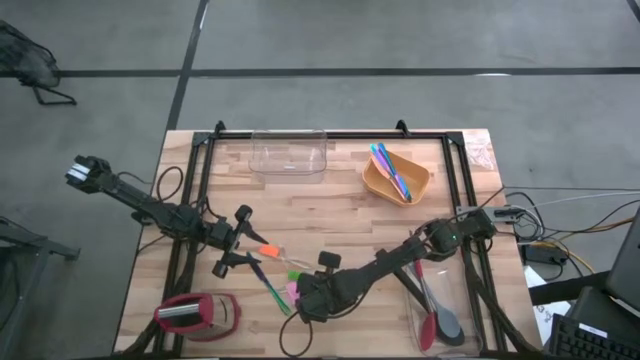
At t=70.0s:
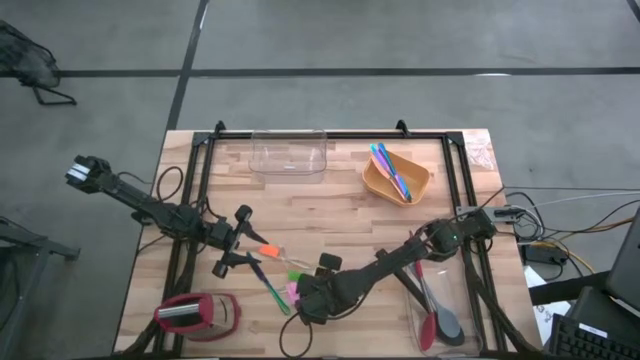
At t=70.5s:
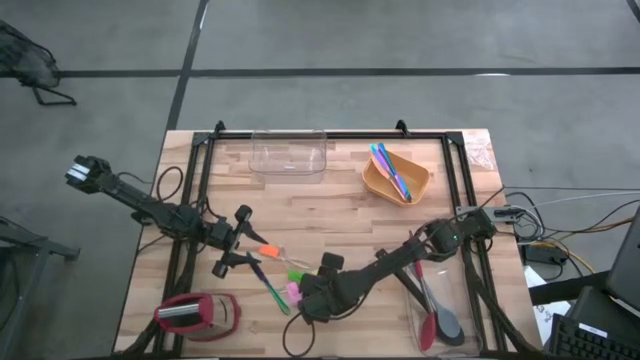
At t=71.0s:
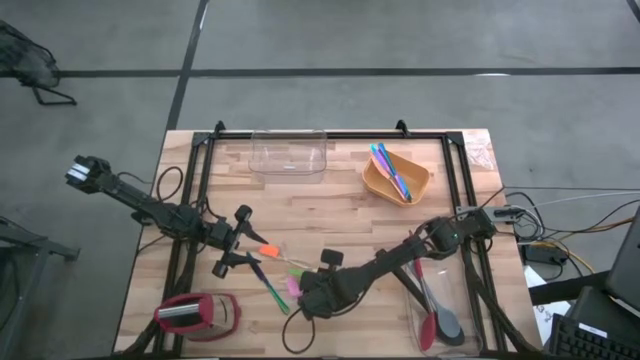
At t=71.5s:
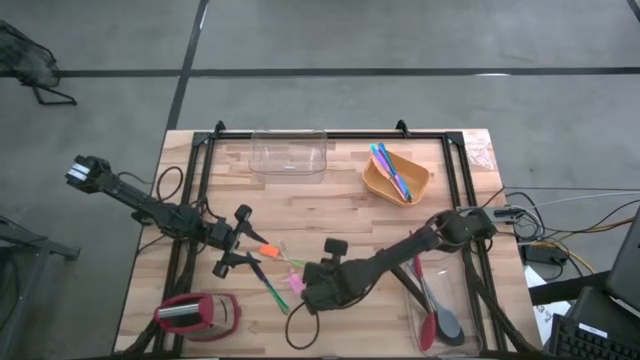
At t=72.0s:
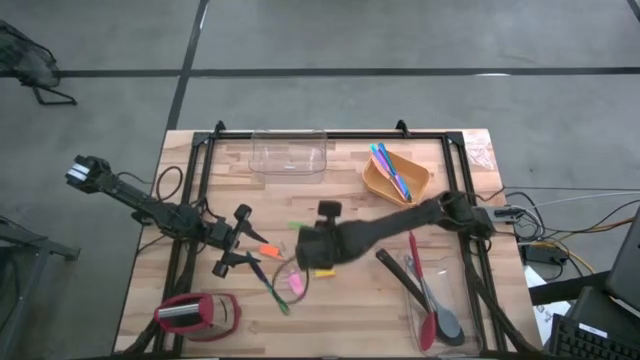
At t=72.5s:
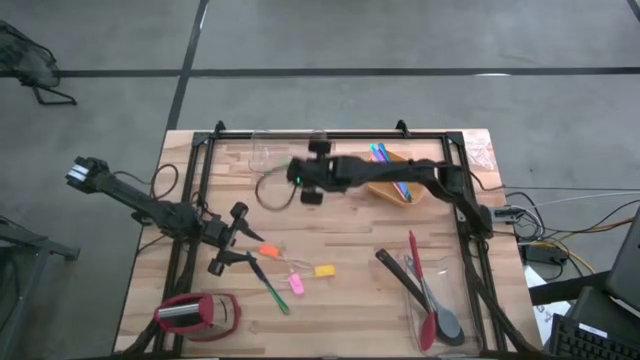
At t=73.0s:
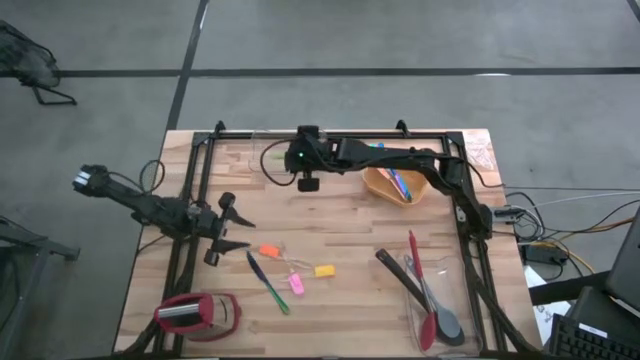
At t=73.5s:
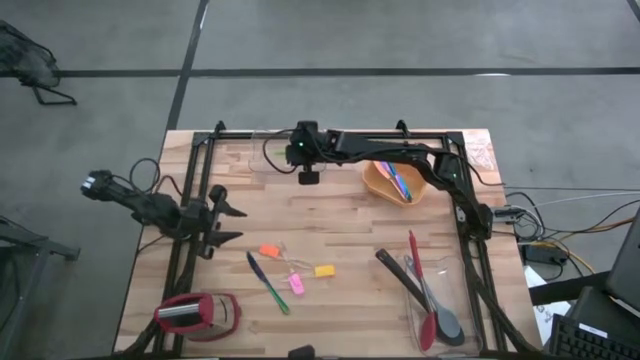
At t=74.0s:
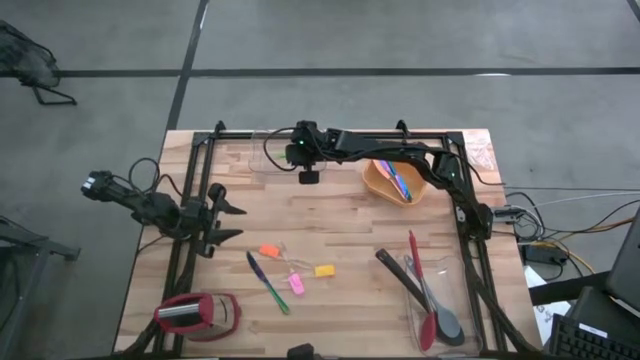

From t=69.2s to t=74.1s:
Task: Pick & Place Kitchen Items
Put the green spatula into the top transparent bin

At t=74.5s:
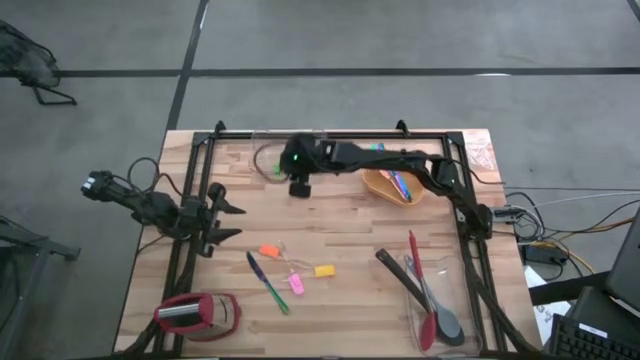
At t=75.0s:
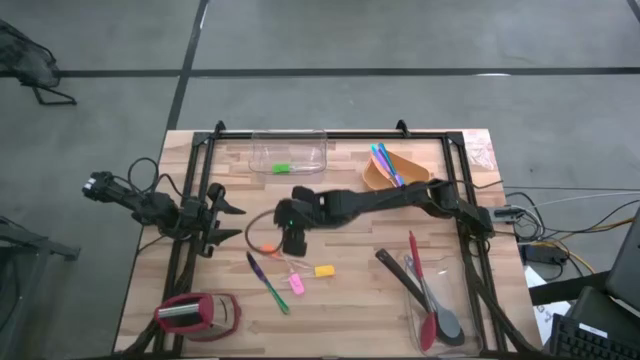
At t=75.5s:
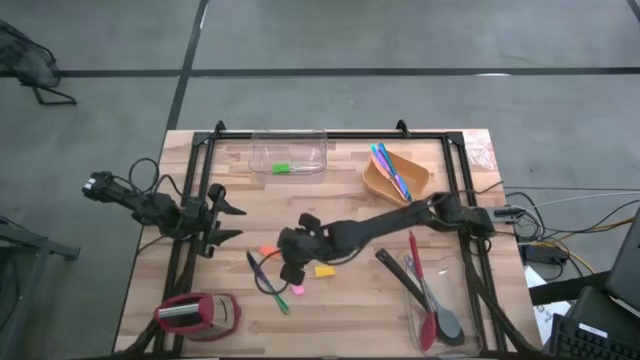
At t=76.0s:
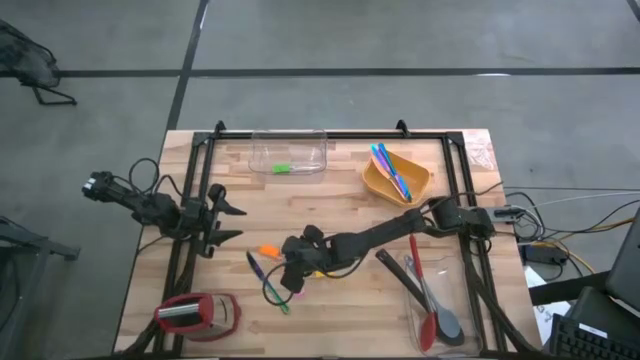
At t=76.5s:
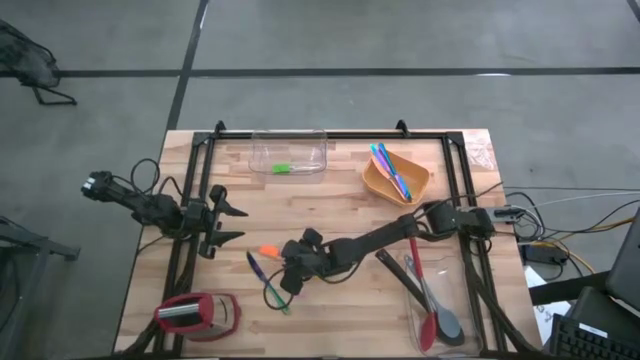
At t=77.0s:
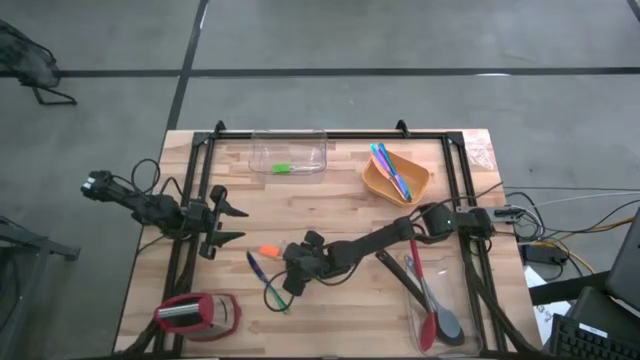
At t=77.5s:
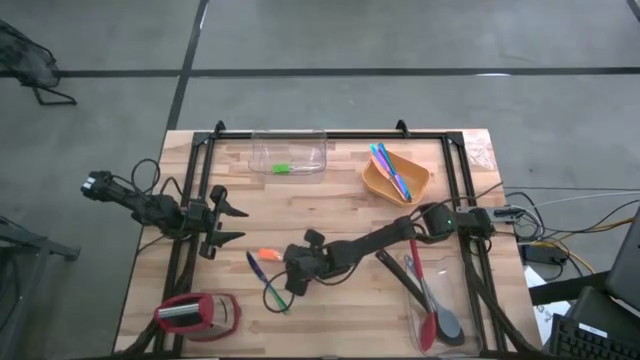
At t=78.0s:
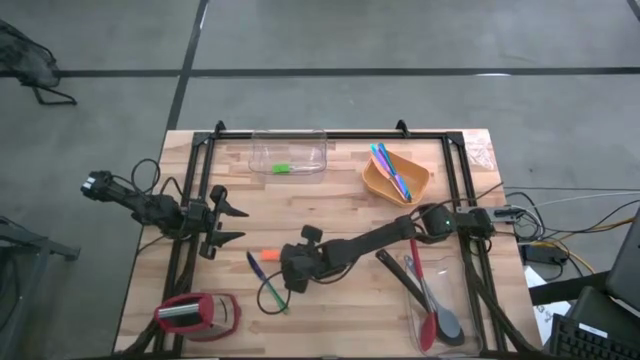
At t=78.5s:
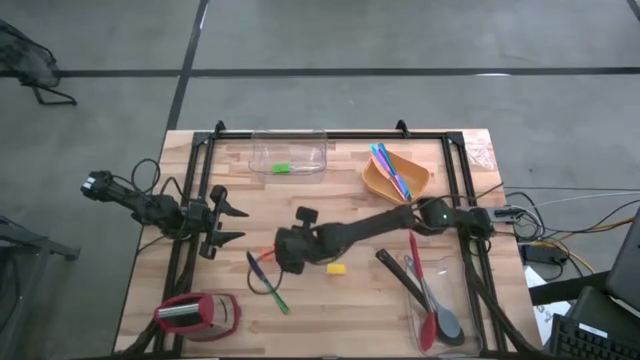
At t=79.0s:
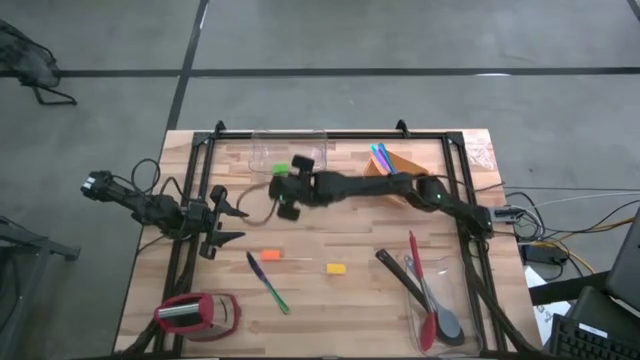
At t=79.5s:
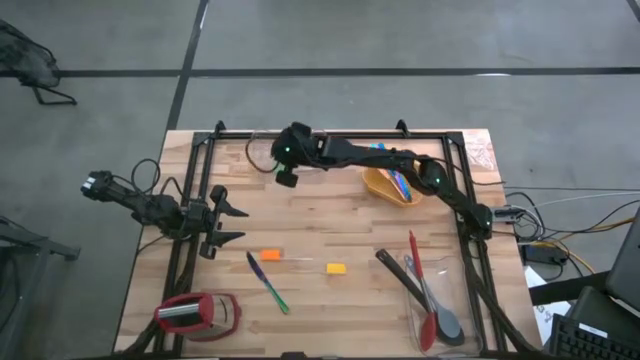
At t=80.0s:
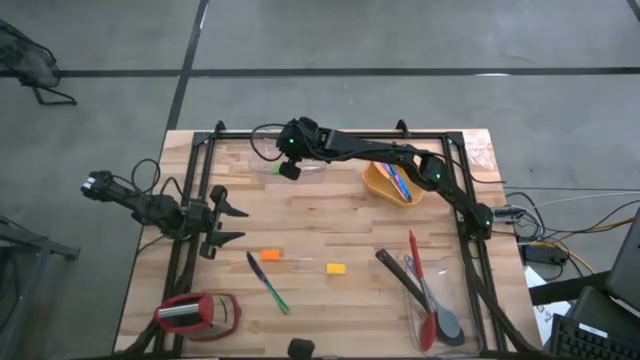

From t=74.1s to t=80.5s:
Put the pink spatula into the top transparent bin

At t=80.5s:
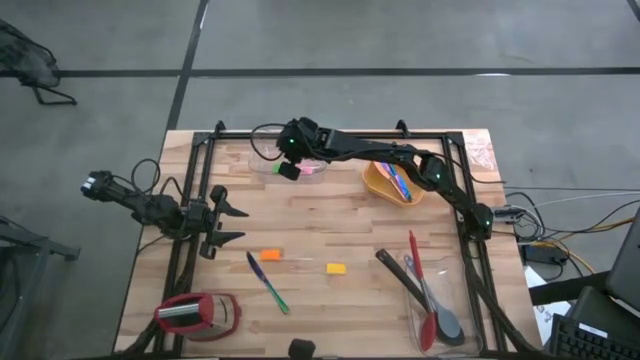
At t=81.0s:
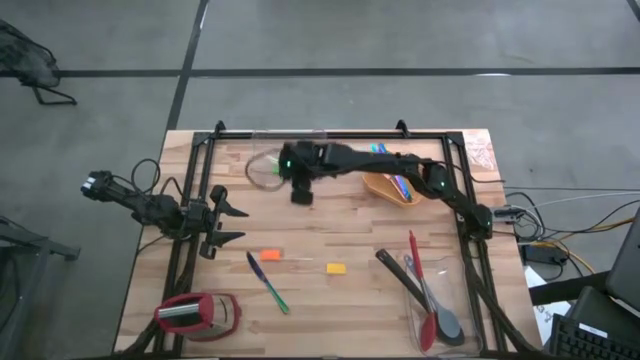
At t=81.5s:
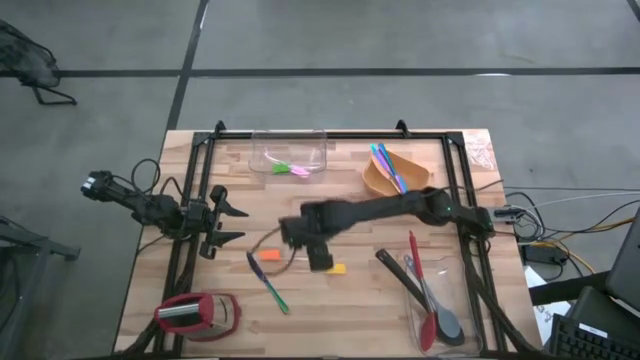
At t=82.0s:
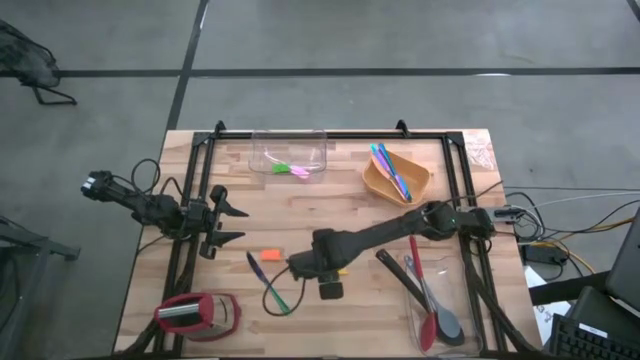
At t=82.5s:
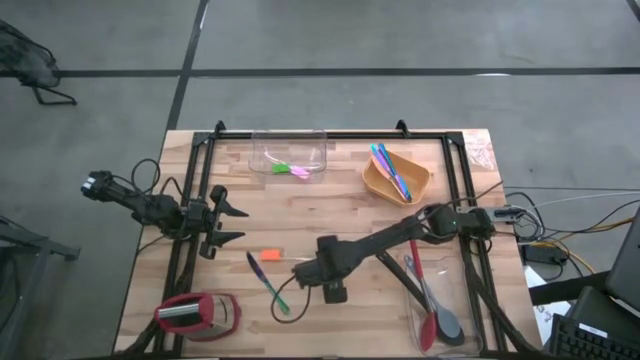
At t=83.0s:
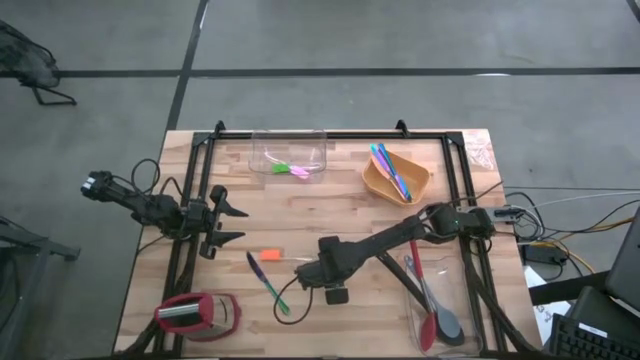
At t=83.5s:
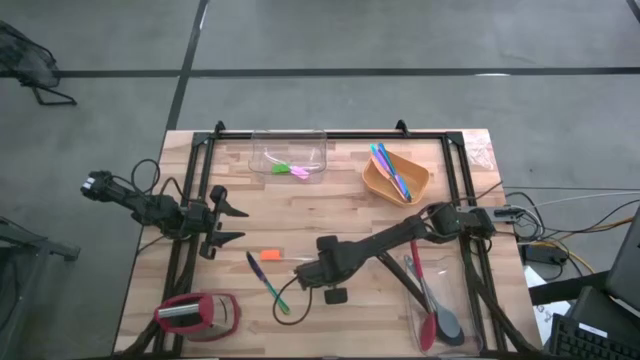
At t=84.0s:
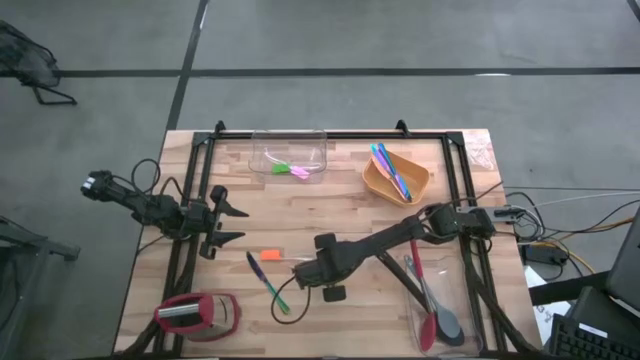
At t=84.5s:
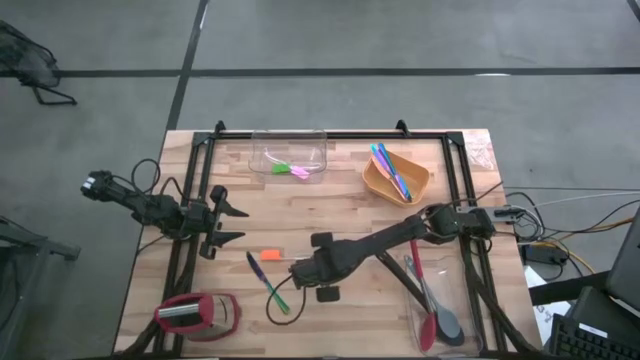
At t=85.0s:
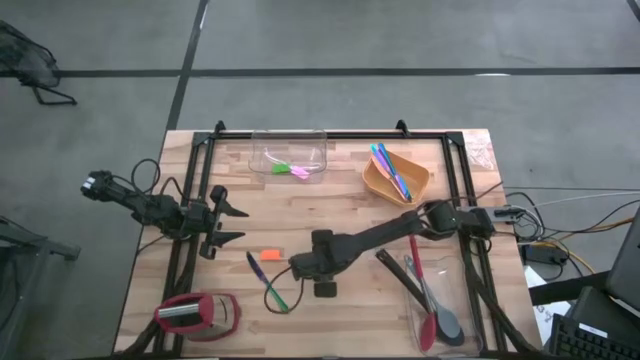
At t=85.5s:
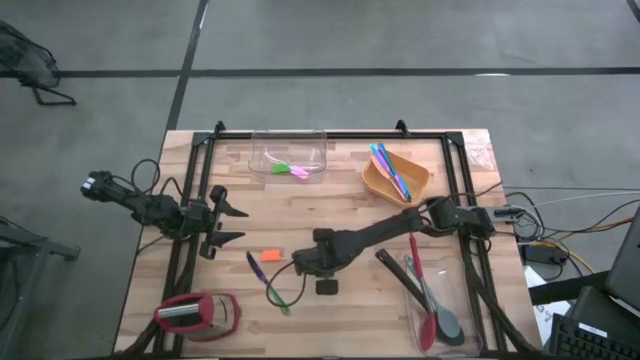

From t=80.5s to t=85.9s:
Put the yellow spatula into the top transparent bin

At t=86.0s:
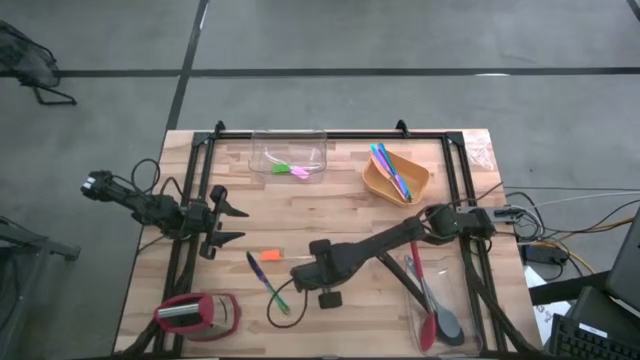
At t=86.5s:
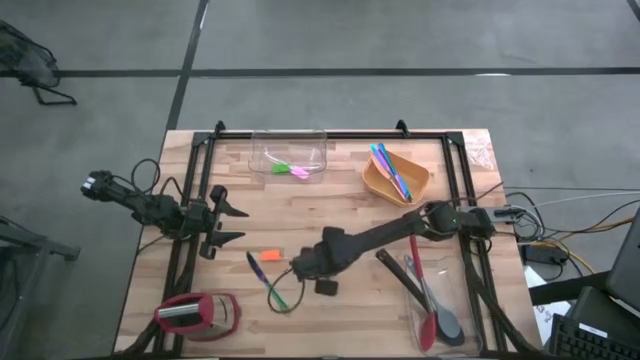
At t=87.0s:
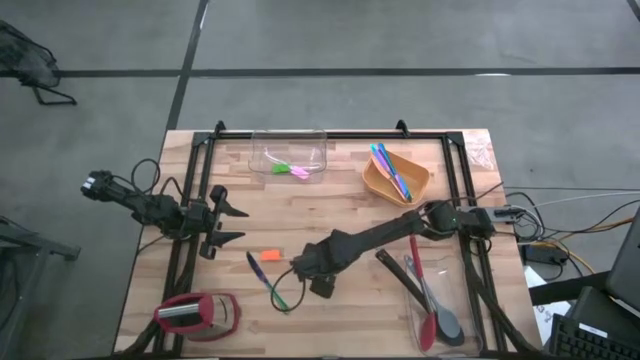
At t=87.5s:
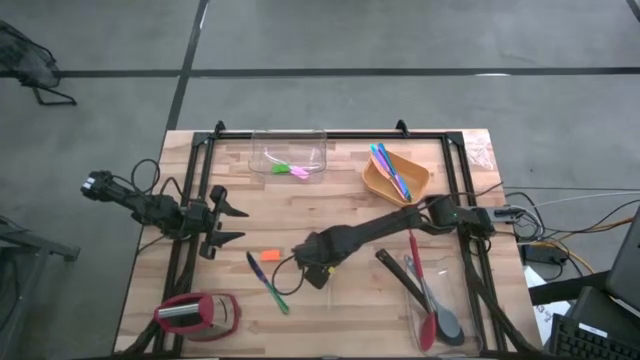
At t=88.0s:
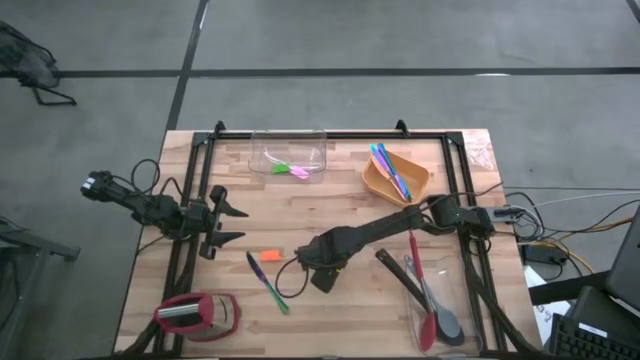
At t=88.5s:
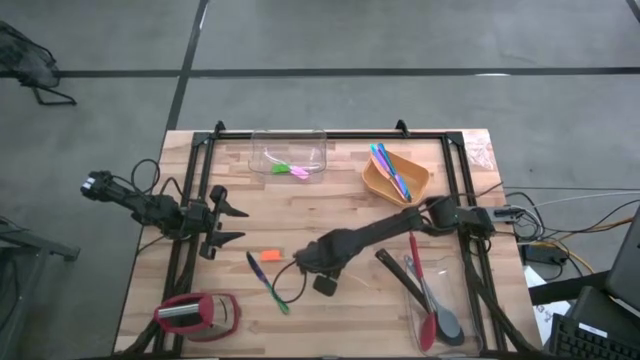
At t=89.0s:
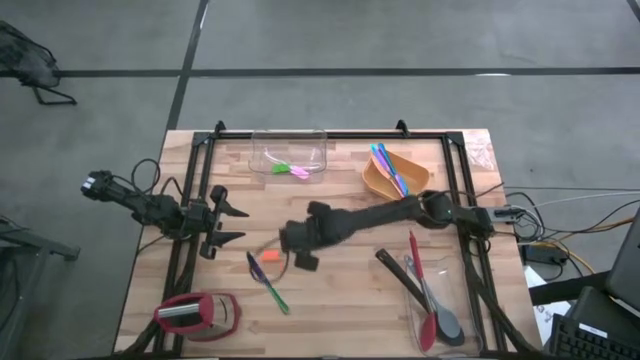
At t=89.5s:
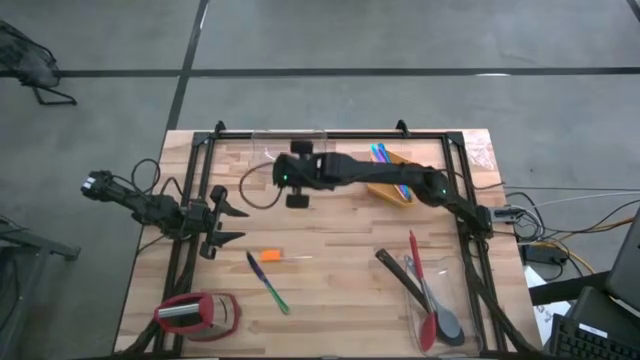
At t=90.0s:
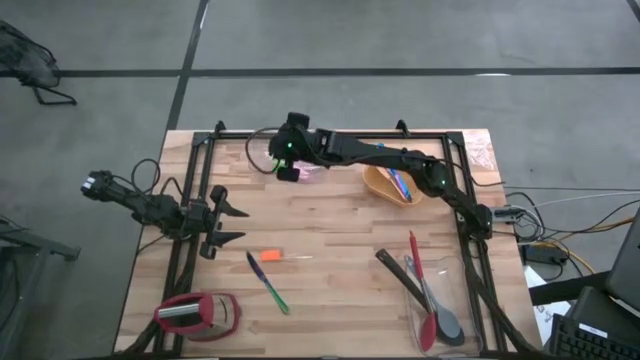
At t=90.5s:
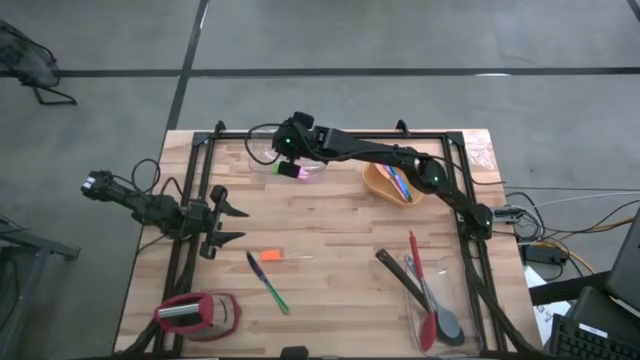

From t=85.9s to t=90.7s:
Put the yellow spatula into the top transparent bin
